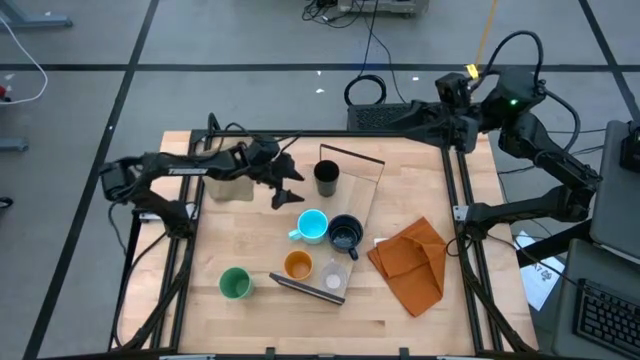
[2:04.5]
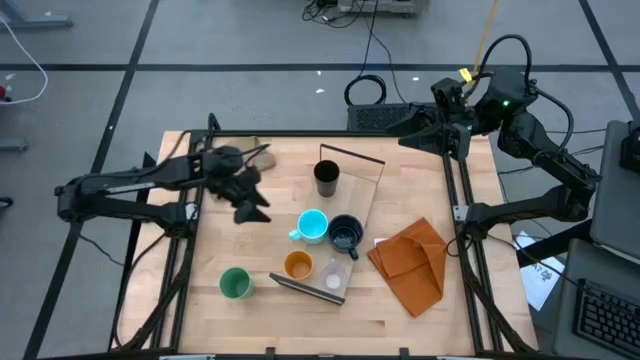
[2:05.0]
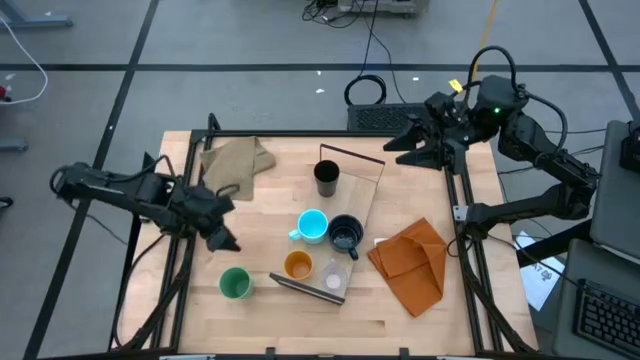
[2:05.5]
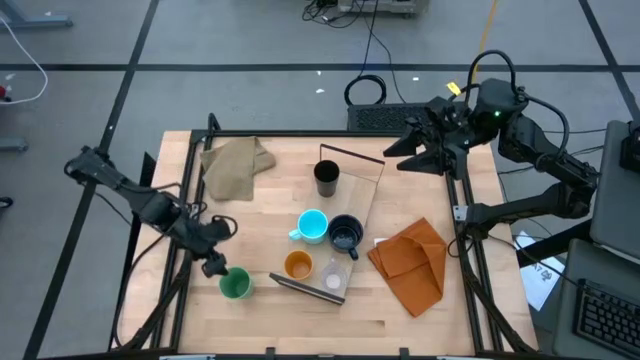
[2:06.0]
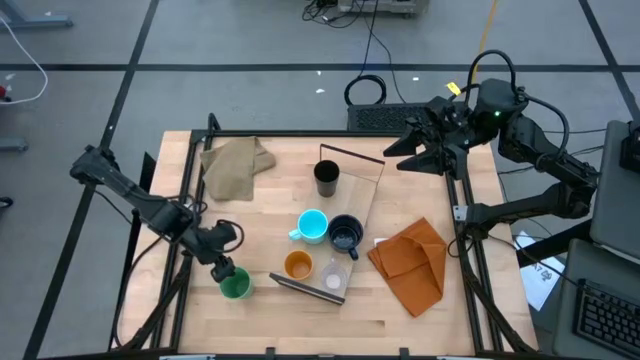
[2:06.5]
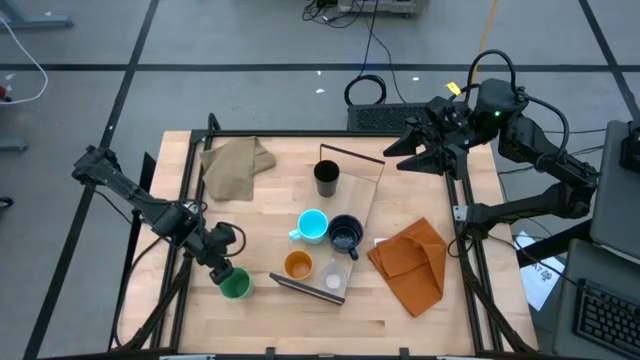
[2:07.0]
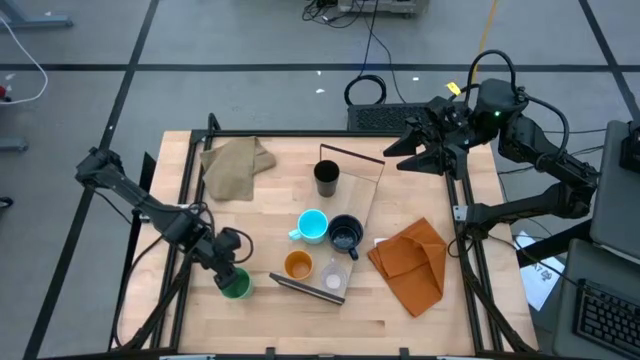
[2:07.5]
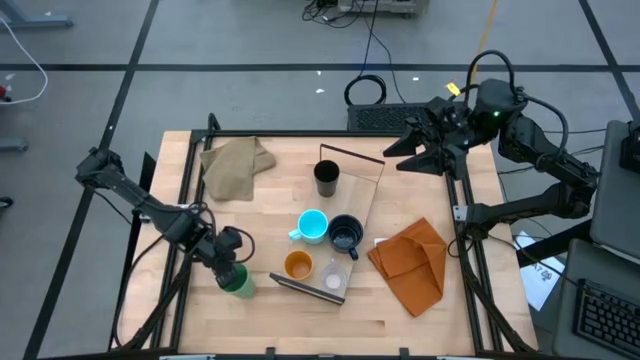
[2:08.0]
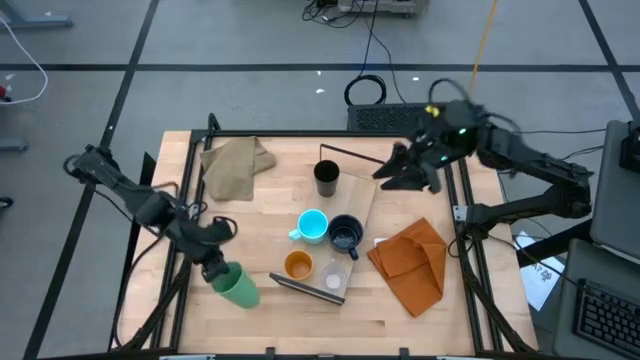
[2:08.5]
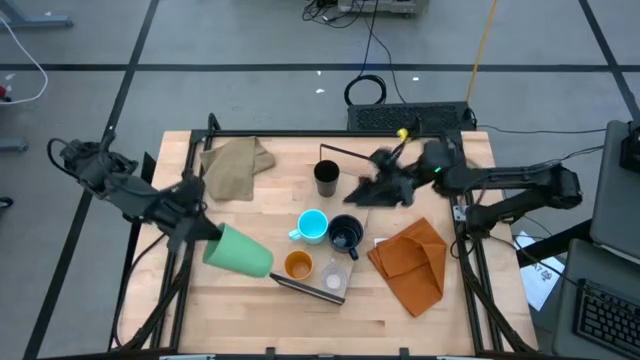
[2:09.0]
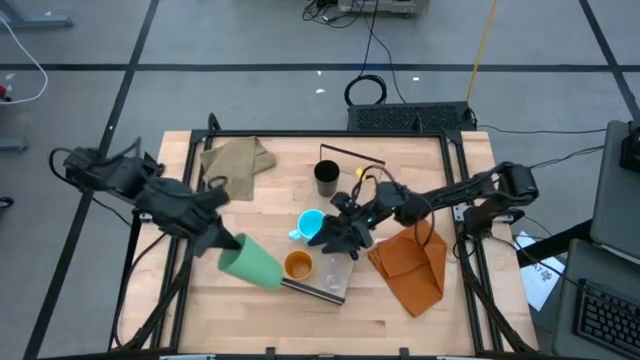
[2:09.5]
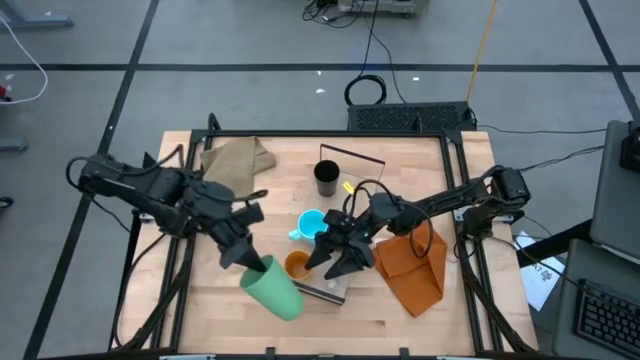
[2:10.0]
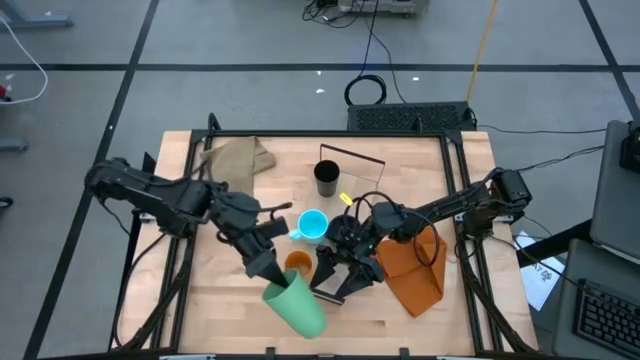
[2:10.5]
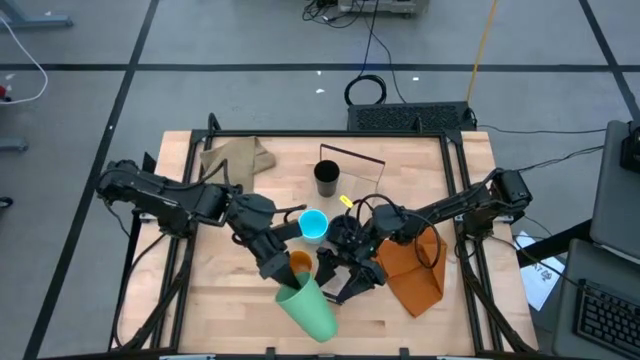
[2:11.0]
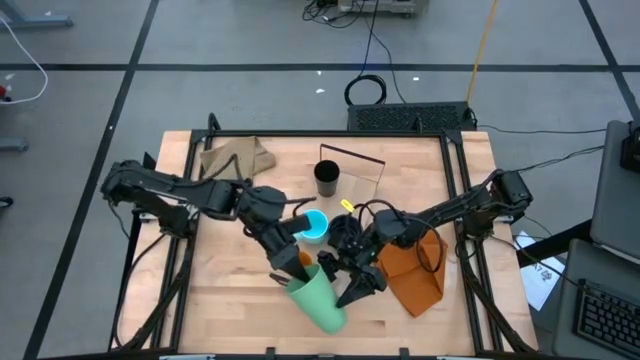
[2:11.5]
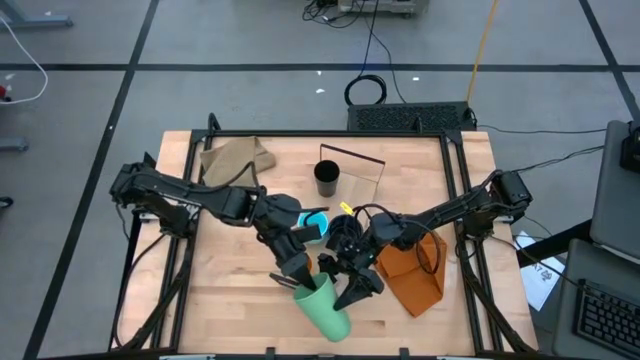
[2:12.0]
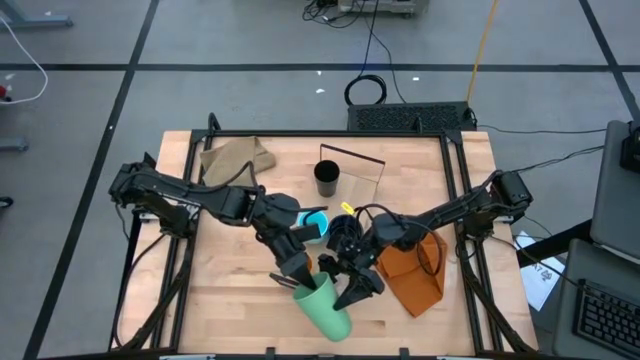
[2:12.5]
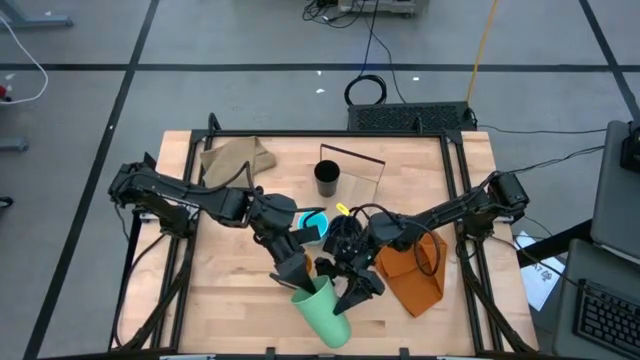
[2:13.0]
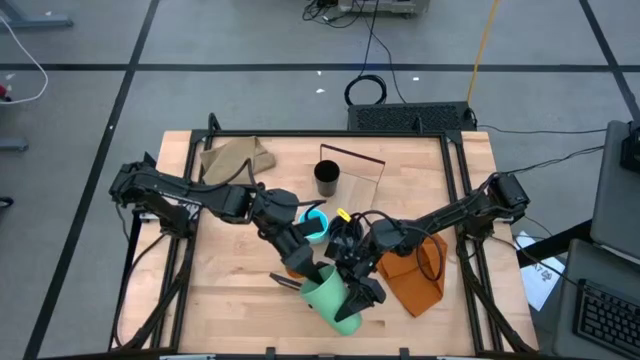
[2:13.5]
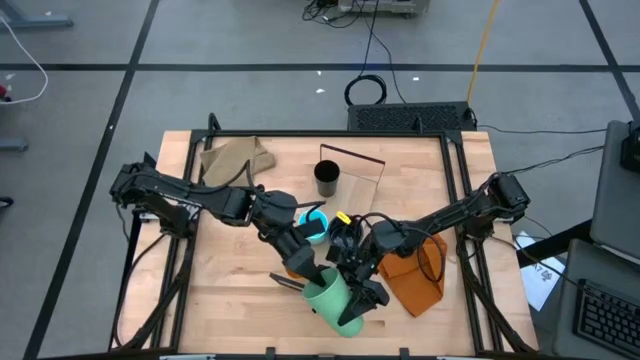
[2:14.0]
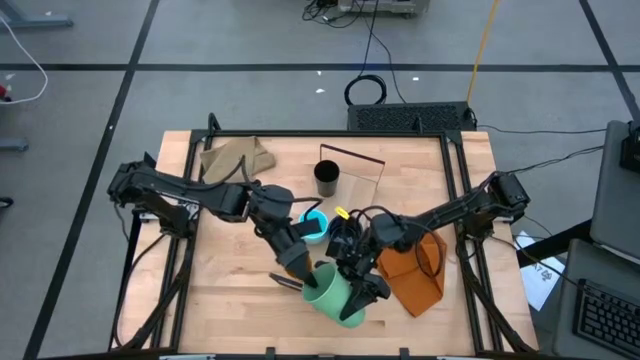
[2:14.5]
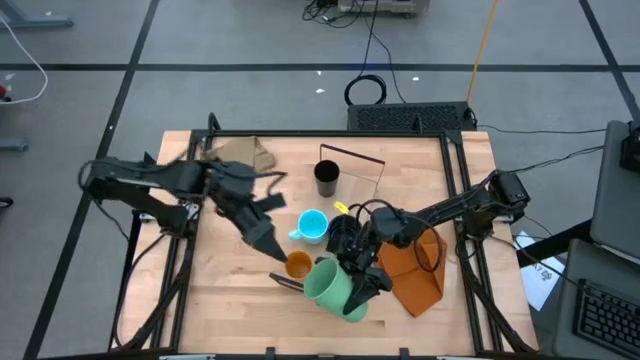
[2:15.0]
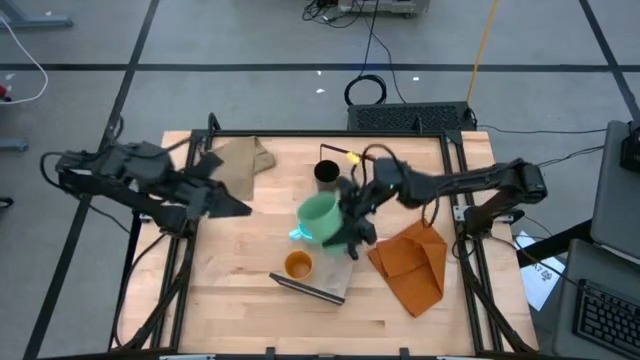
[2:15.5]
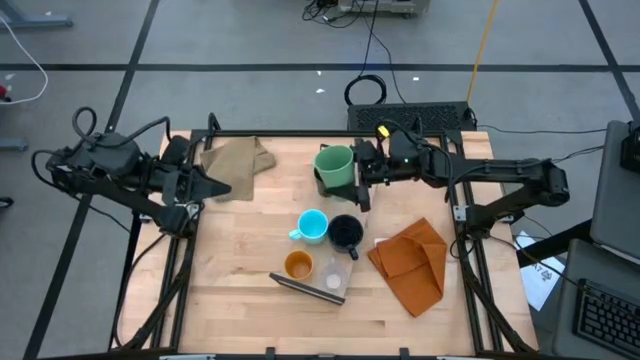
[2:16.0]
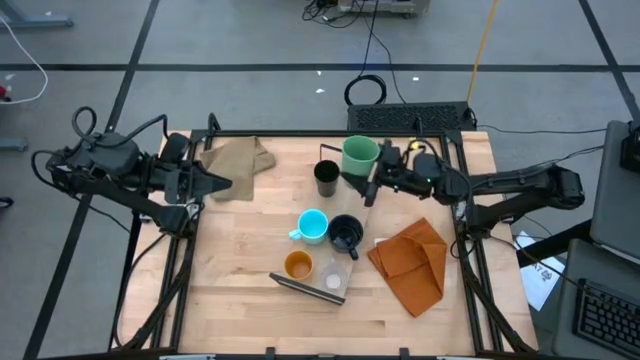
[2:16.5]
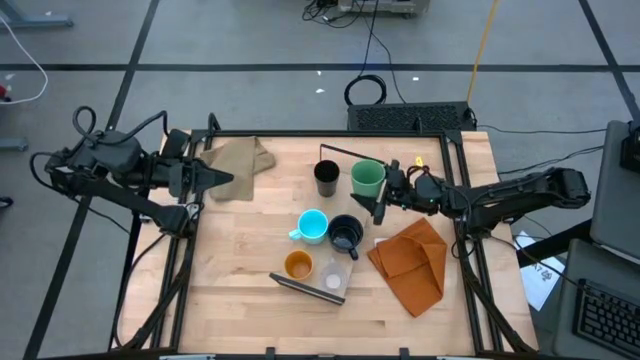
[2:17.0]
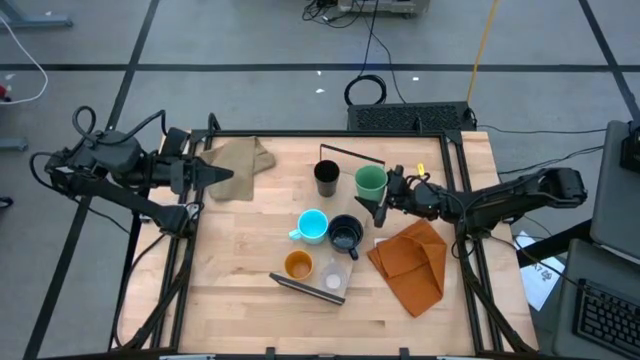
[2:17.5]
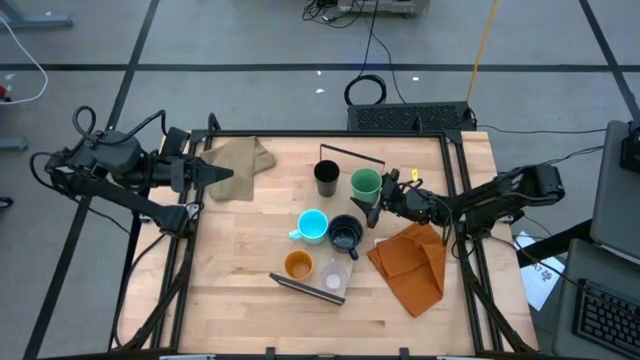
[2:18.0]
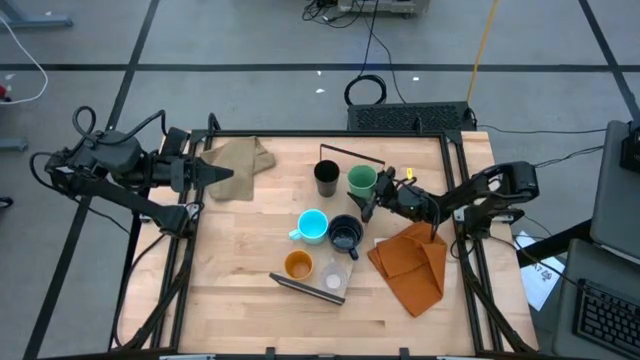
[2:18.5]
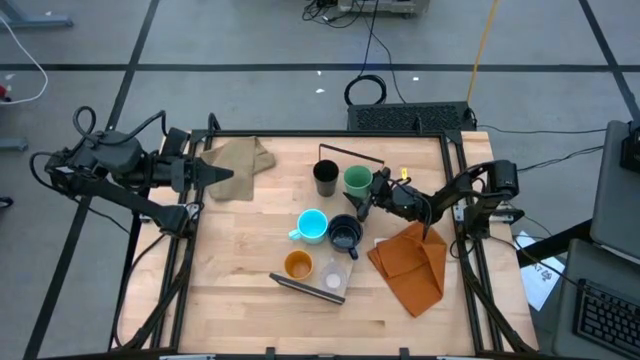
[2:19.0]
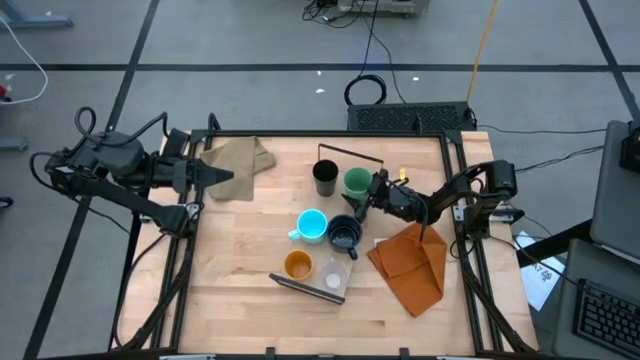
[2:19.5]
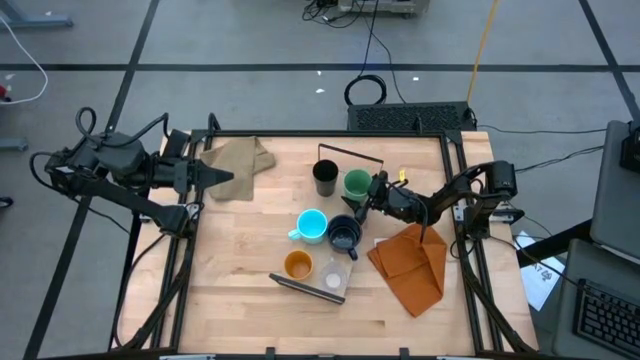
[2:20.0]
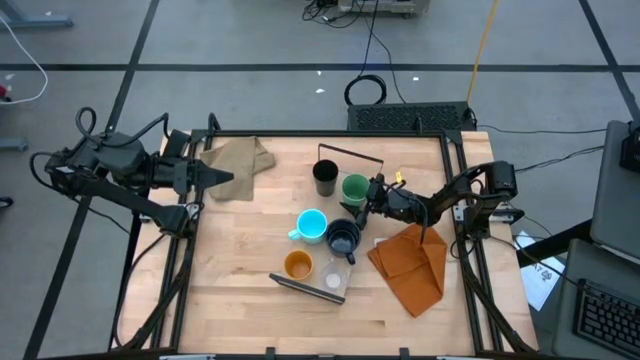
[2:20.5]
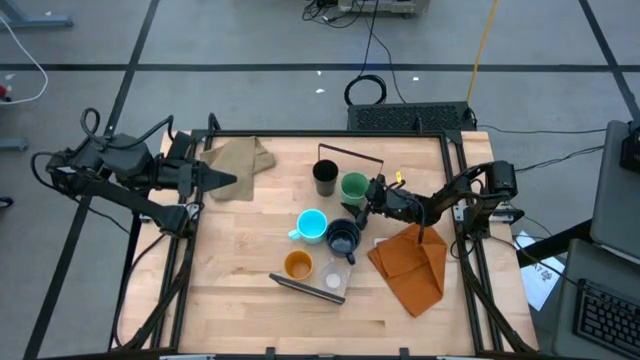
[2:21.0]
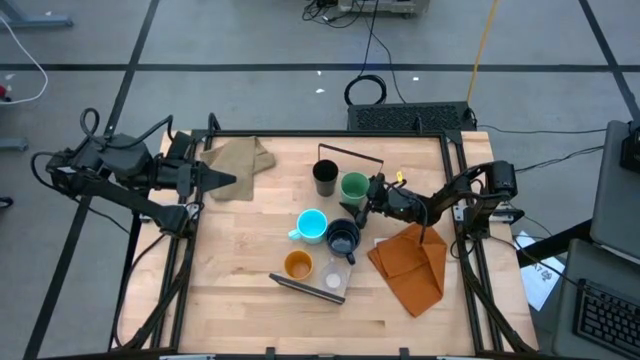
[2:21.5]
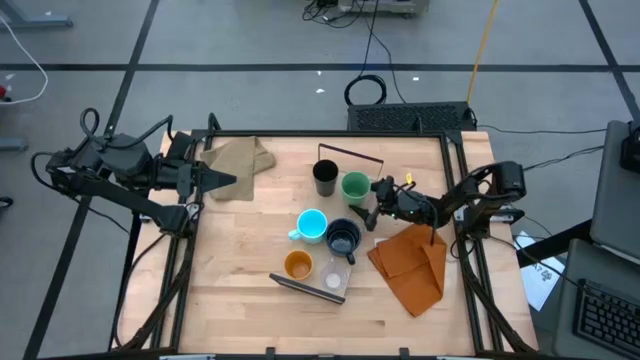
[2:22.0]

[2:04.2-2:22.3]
Task: Stack small to large cups/mugs on shelf
Put the green cup on the shelf

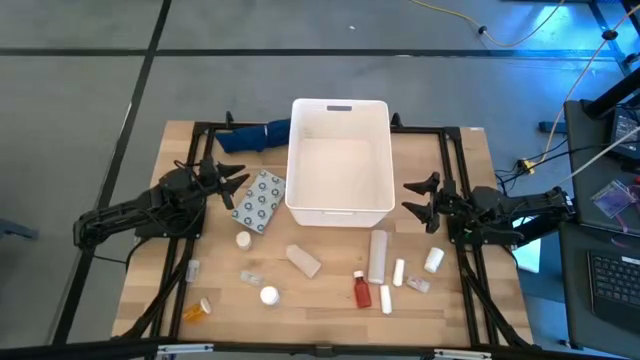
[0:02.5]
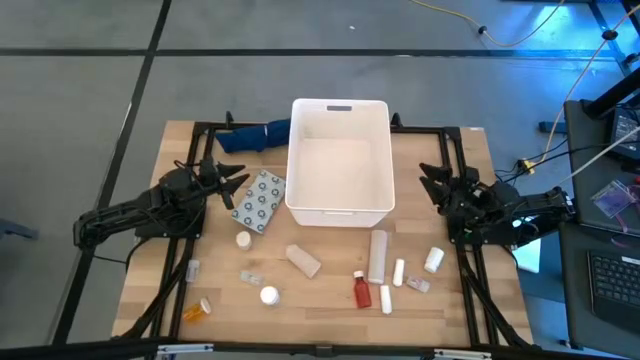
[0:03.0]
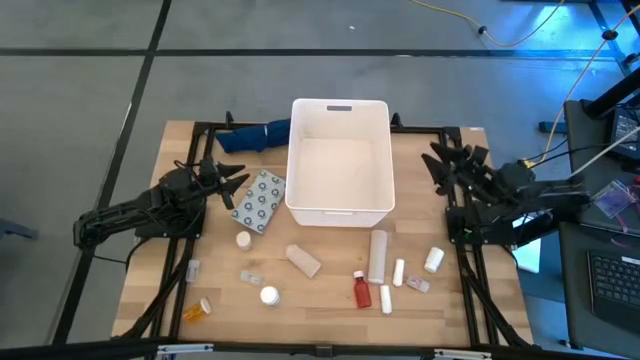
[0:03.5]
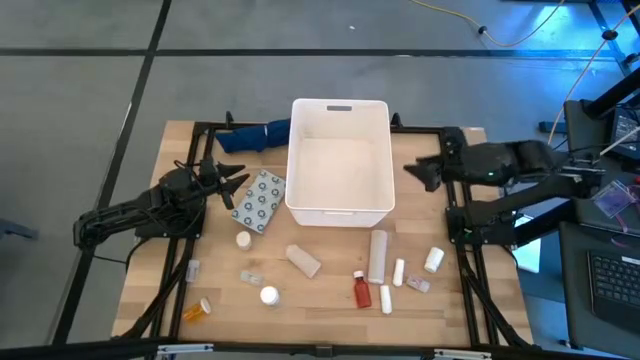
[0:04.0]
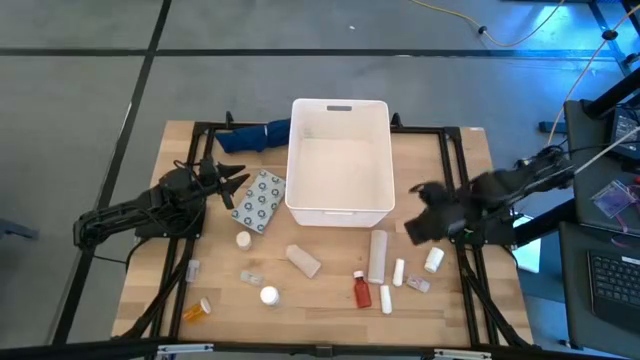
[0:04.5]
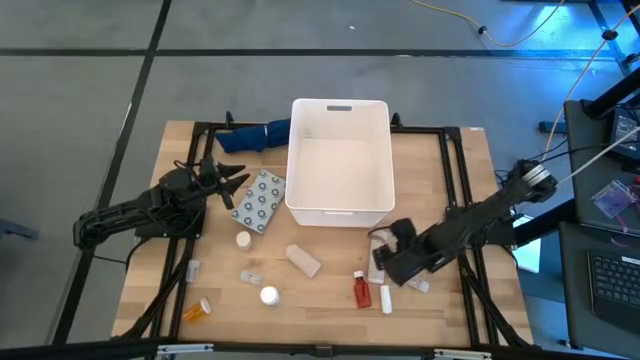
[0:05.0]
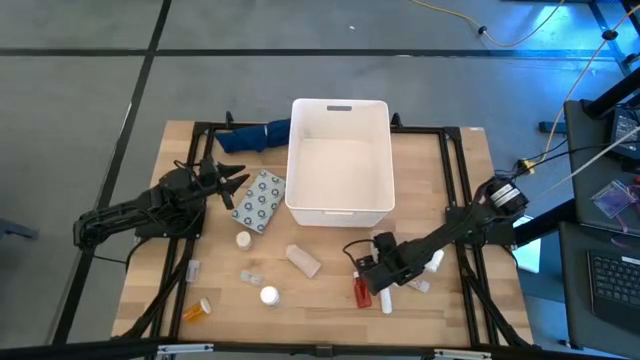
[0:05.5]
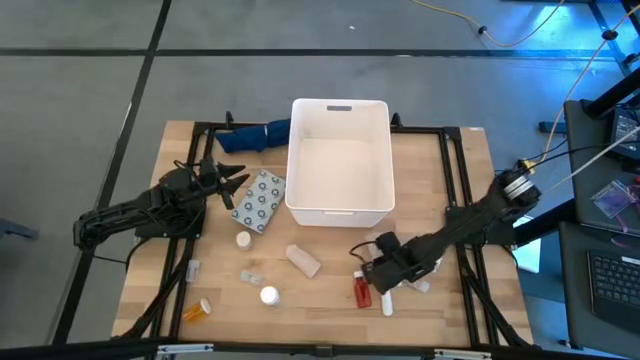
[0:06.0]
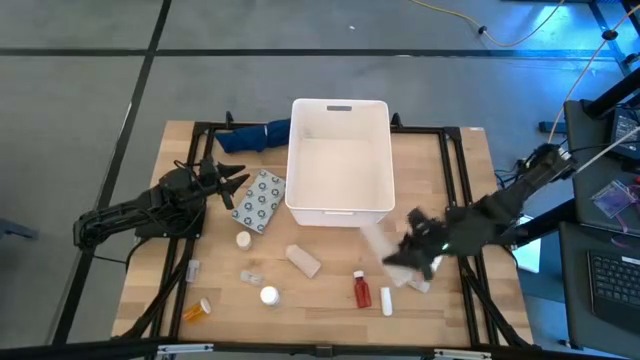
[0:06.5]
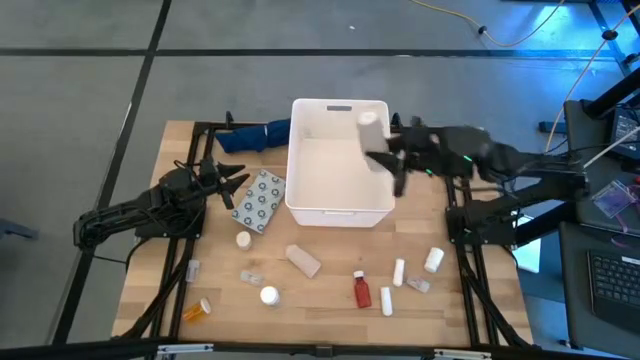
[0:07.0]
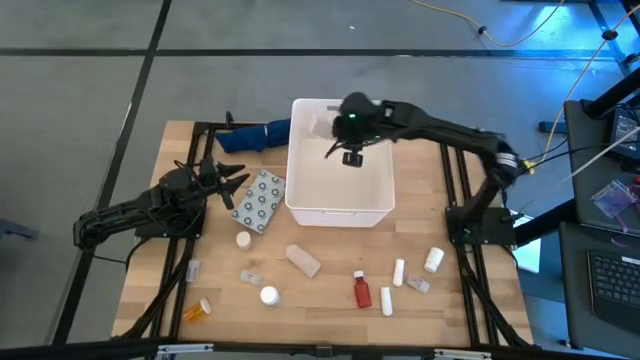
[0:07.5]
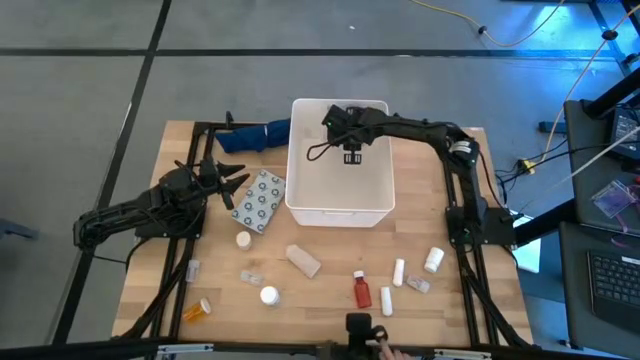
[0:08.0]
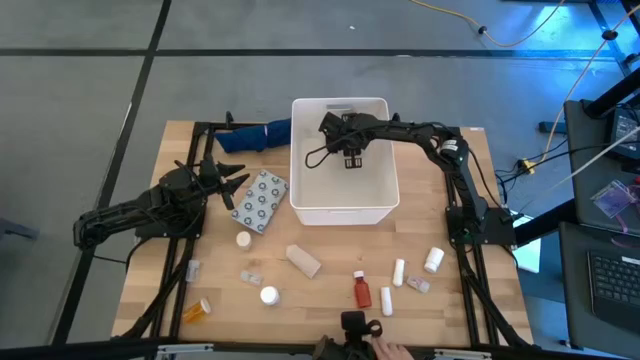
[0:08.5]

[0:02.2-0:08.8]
Task: Pick & place medical supplies in basket/bin
Put the right white bandage into the bin
